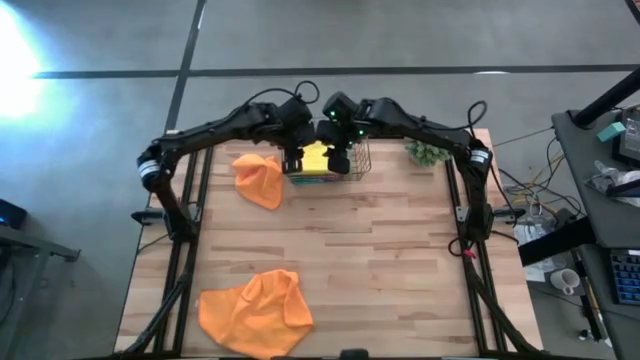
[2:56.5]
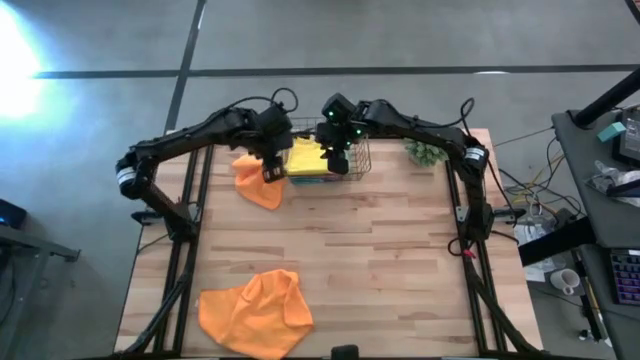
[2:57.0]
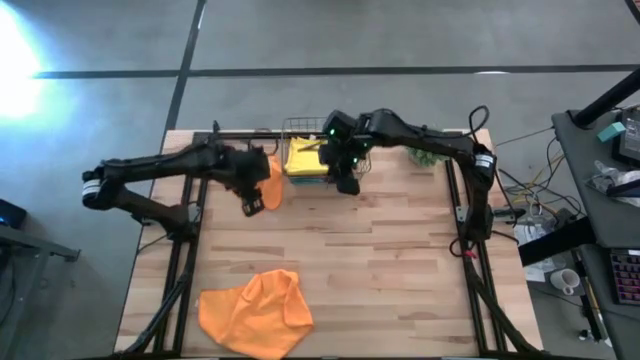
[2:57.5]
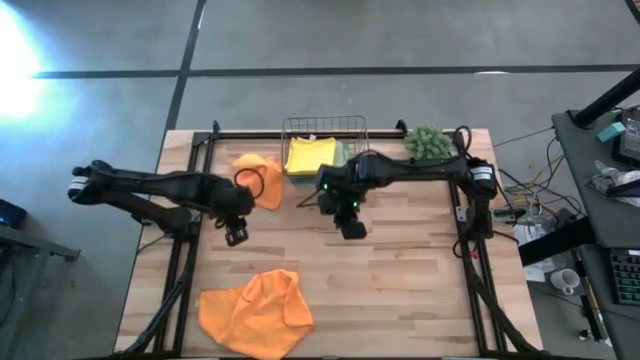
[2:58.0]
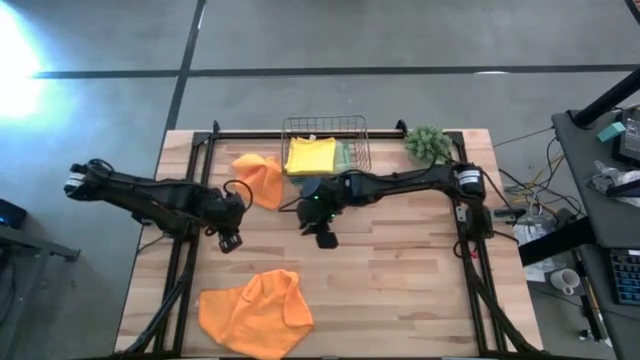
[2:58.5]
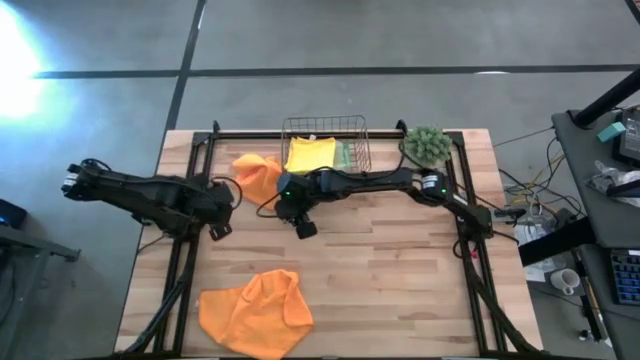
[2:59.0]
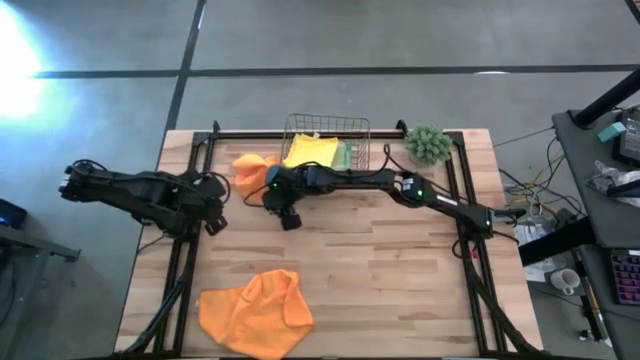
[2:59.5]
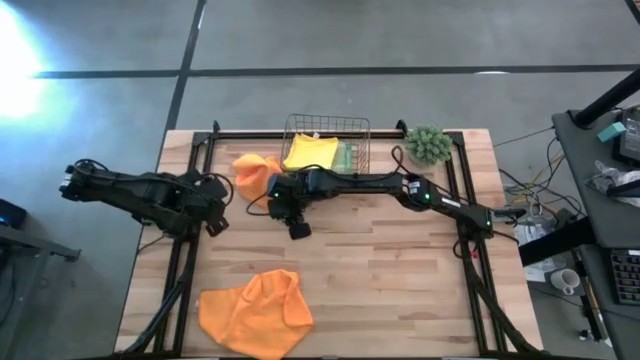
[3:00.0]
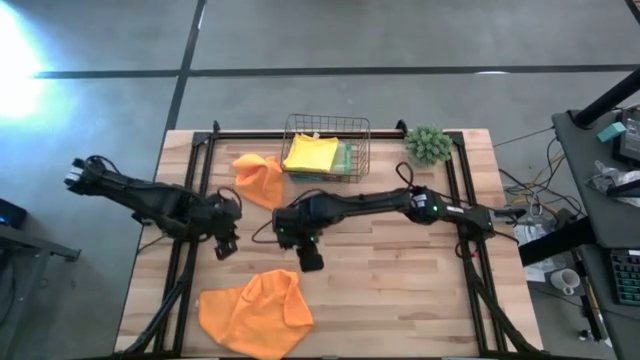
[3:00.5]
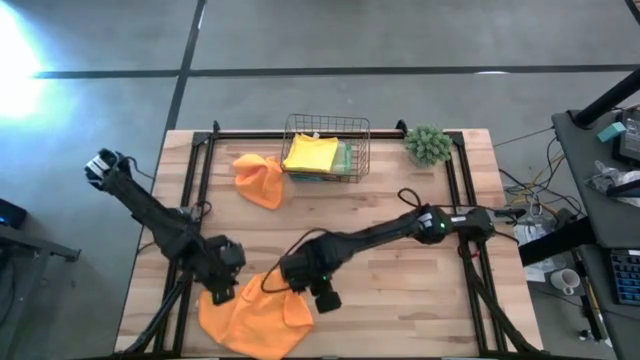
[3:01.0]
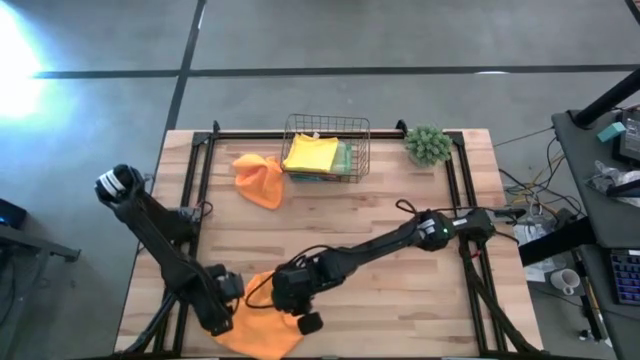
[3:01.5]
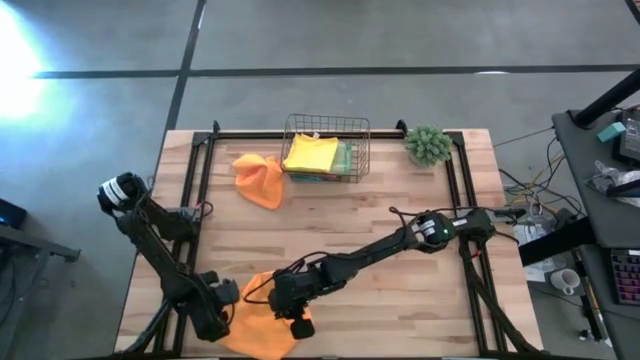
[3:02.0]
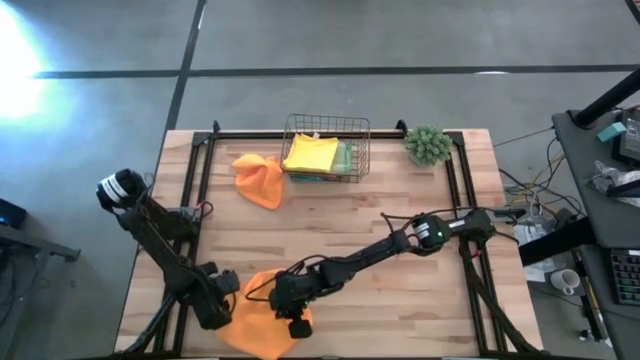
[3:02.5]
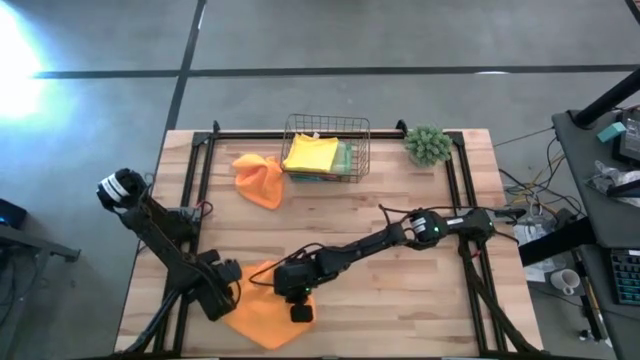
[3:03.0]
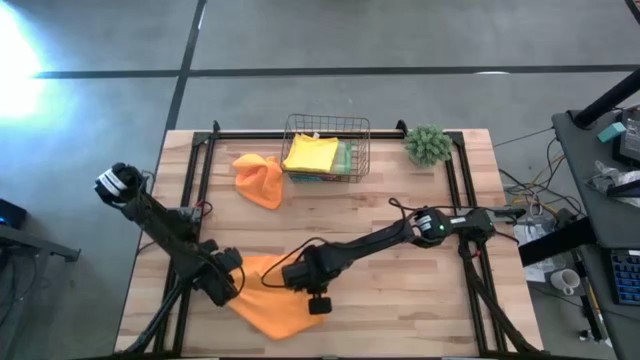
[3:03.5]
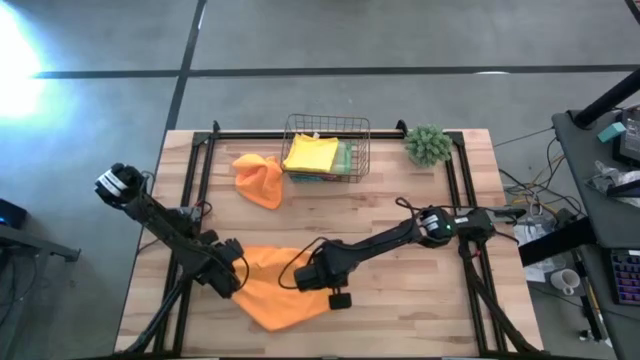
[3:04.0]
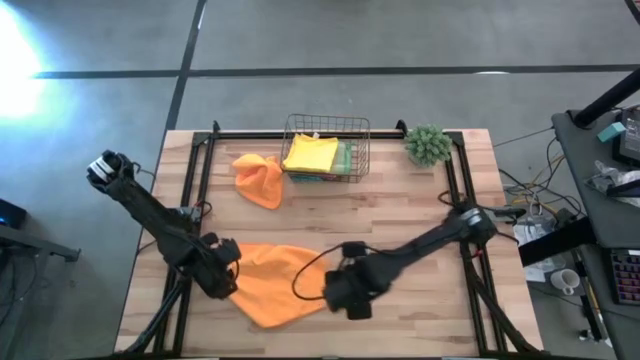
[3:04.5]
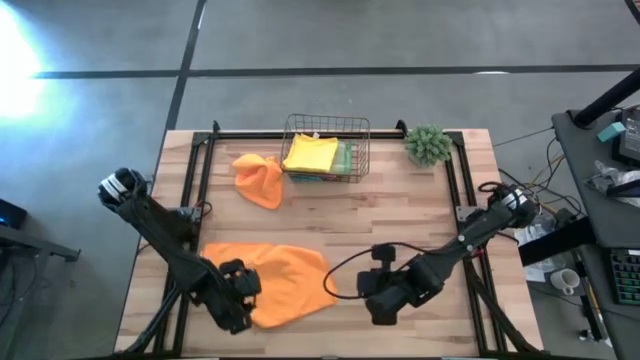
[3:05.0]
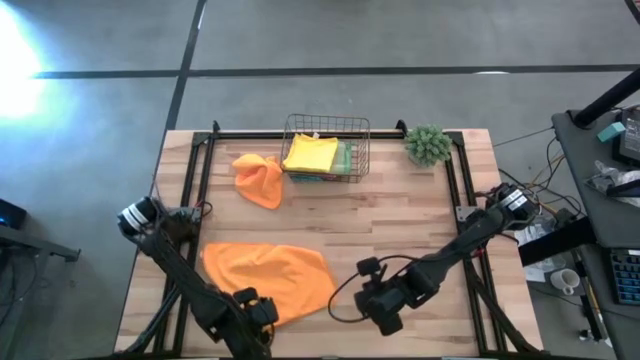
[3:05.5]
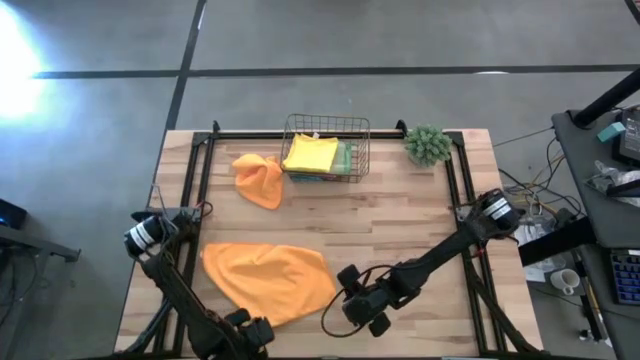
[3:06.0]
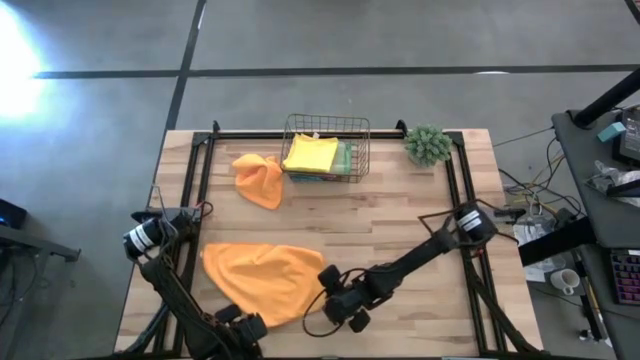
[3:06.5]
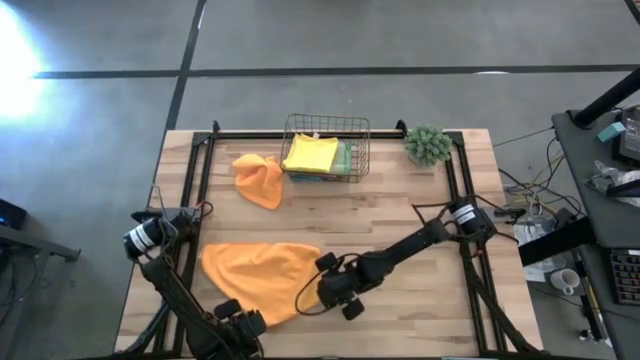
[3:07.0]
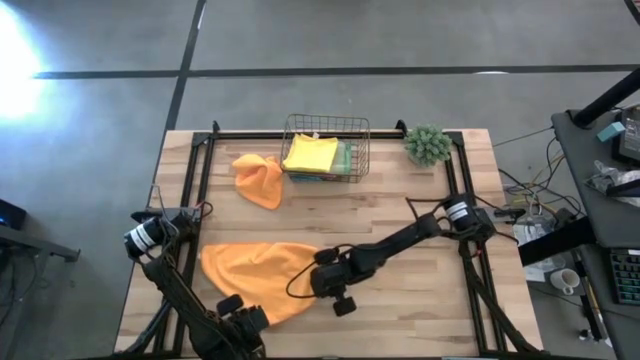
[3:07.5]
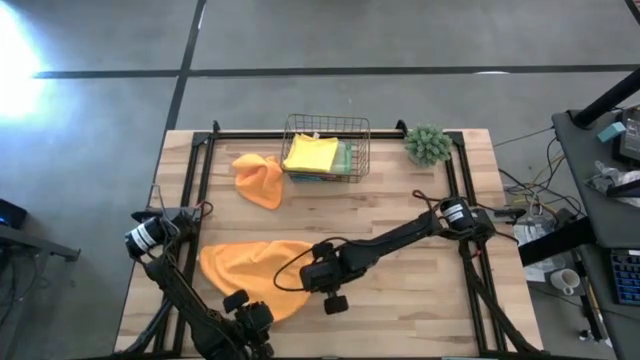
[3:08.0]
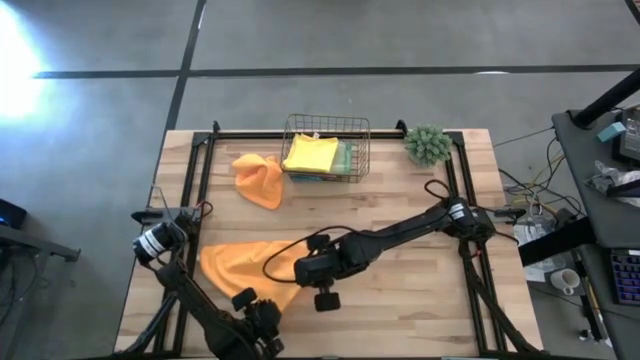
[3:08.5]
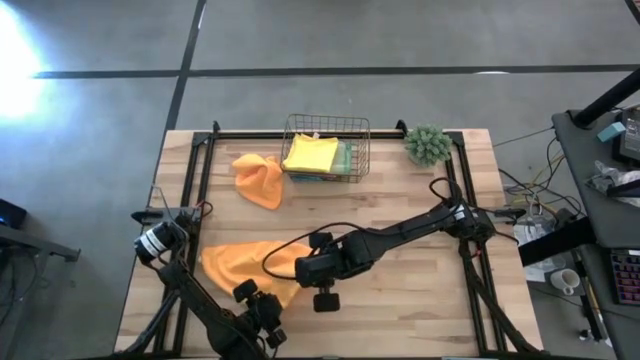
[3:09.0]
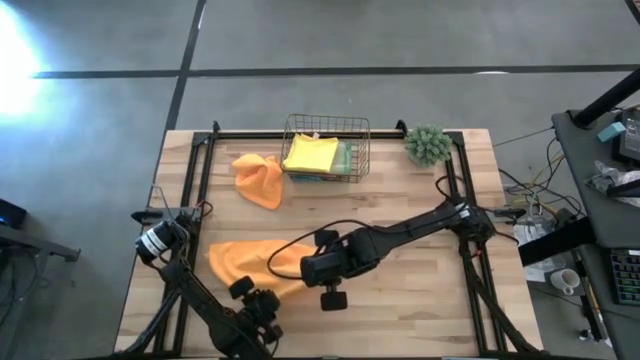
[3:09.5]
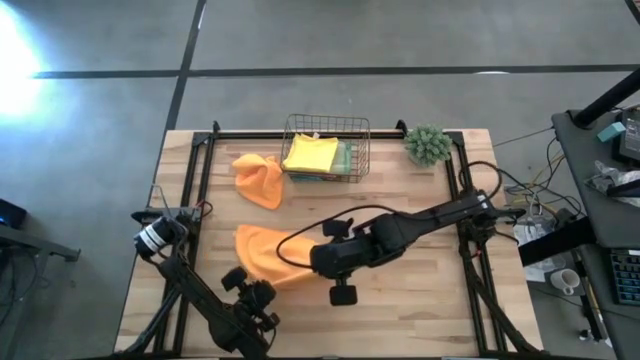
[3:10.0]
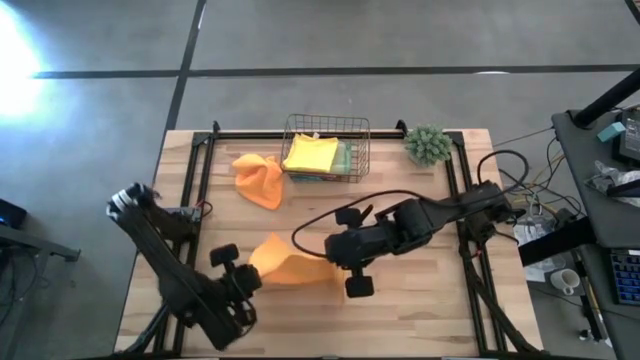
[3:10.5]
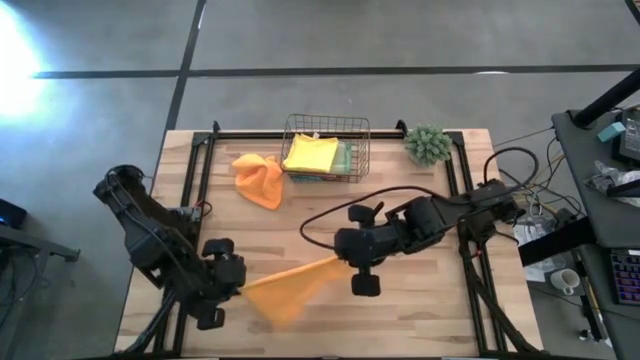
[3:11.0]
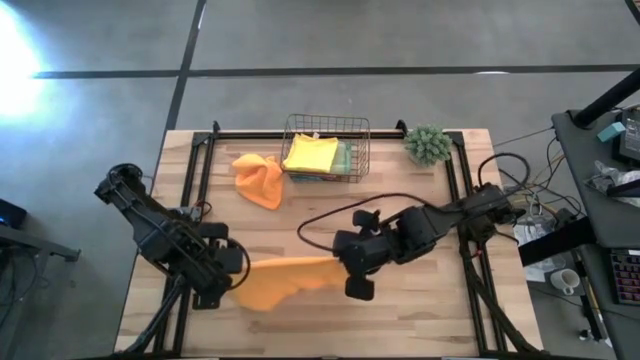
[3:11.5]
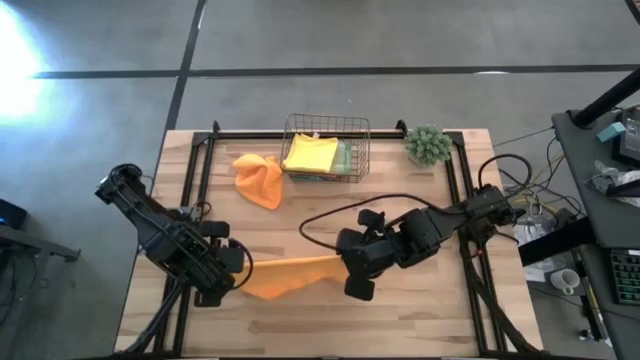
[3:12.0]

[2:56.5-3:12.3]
Task: Fold microfiber towels
Fold the bottom orange microfiber cloth

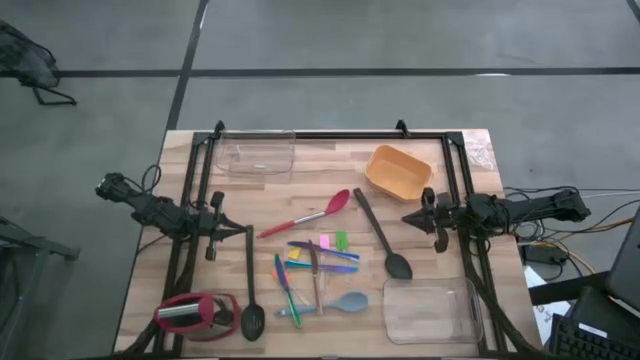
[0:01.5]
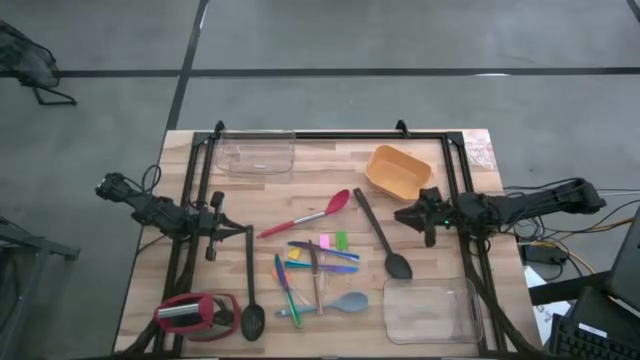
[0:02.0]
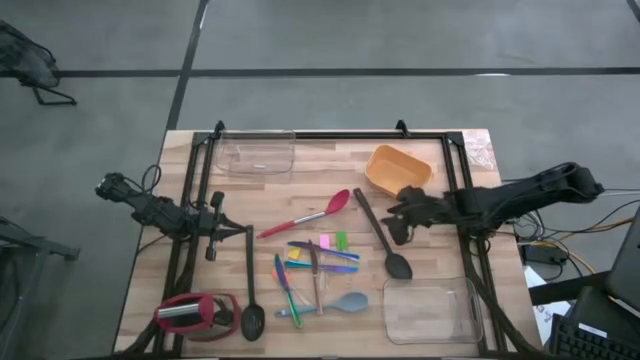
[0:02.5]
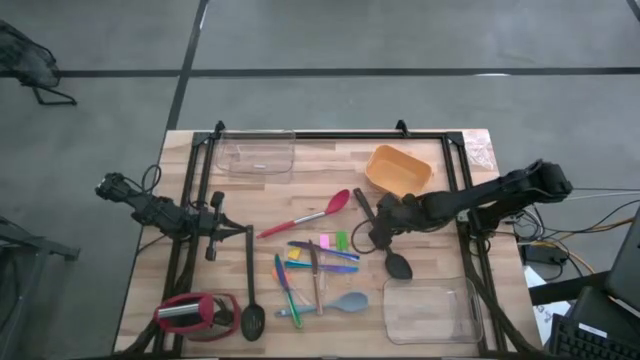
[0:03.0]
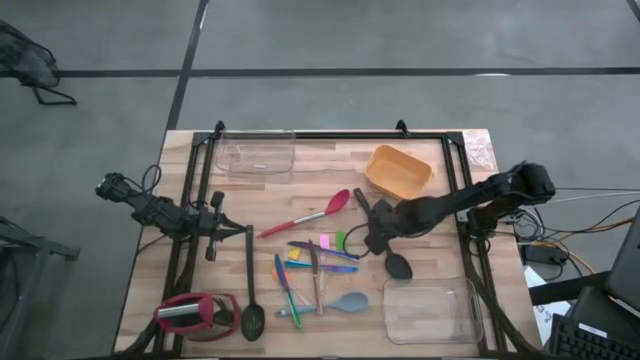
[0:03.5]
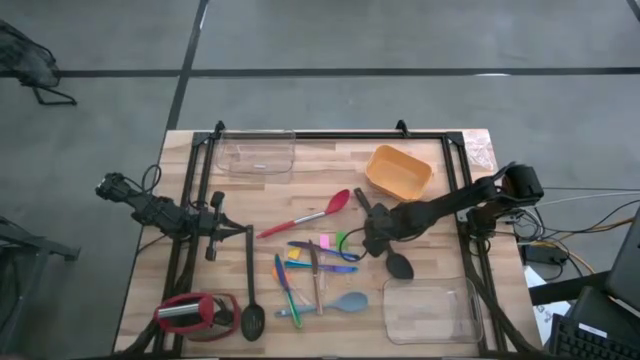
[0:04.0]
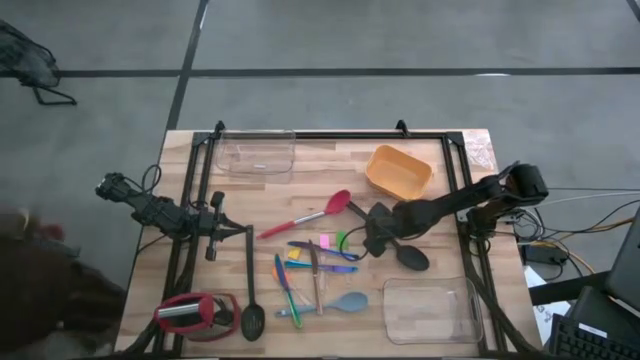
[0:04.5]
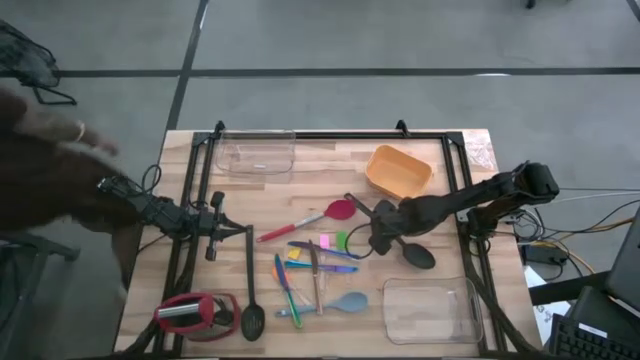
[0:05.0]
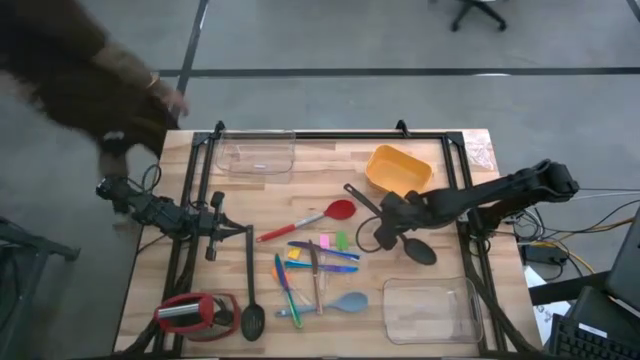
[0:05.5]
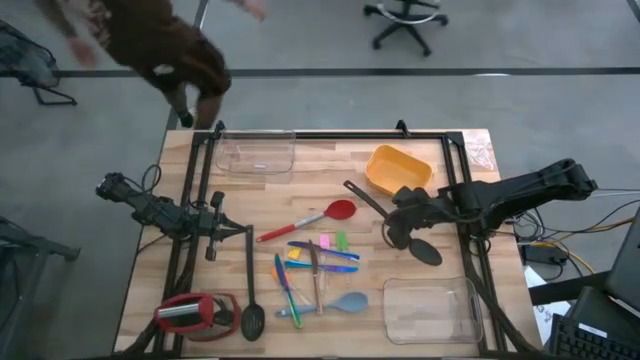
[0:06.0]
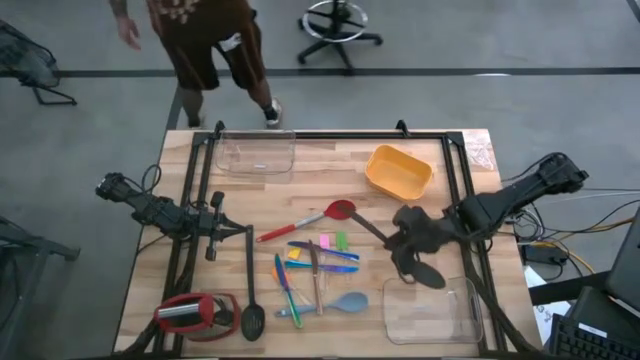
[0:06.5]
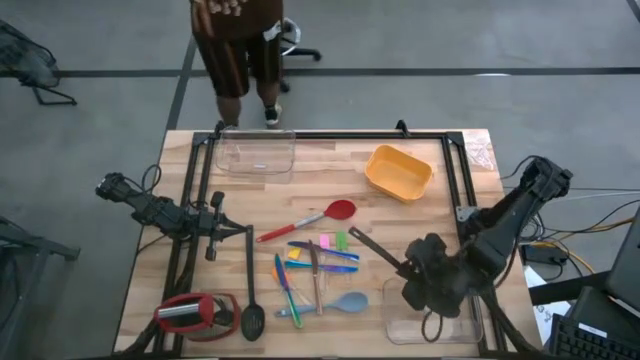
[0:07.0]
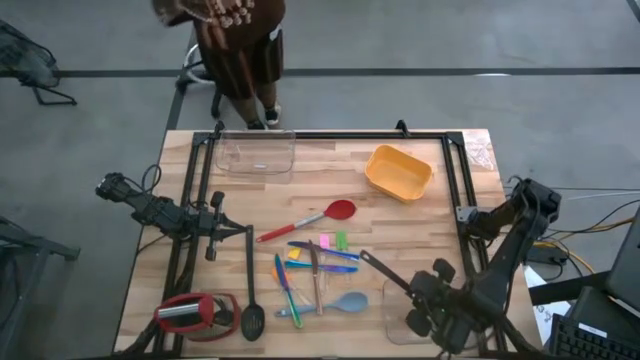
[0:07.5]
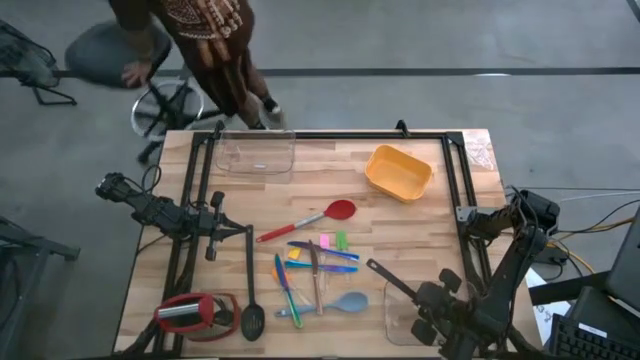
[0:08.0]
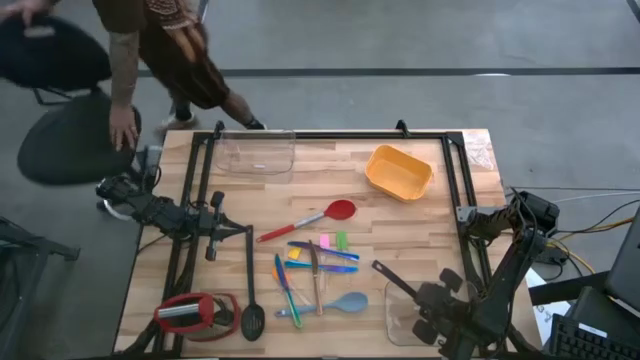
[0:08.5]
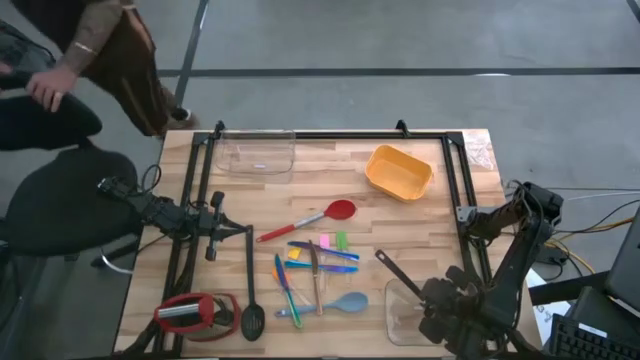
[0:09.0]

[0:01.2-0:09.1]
Task: Pick & Place Kitchen Items
Put the black serving spoon into the bottom transparent bin
